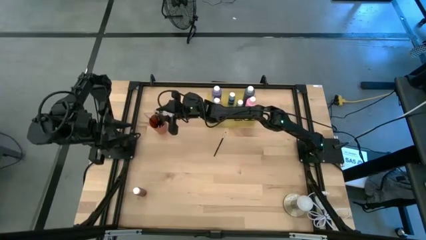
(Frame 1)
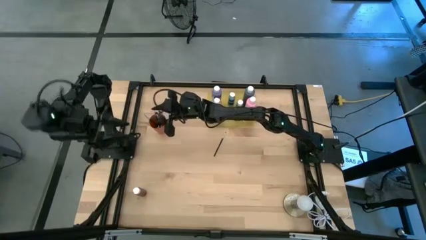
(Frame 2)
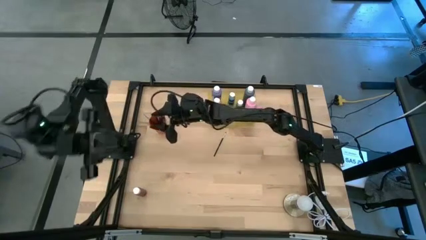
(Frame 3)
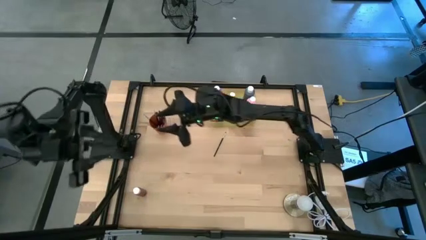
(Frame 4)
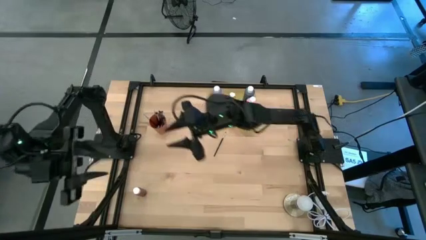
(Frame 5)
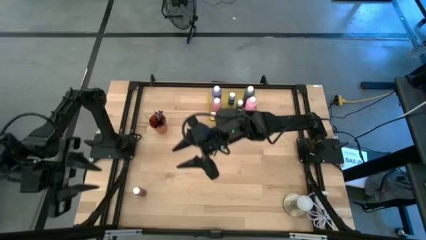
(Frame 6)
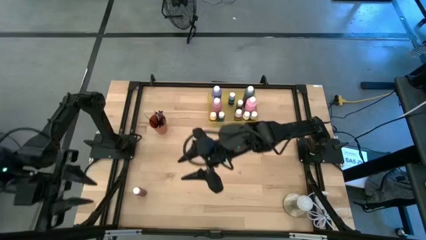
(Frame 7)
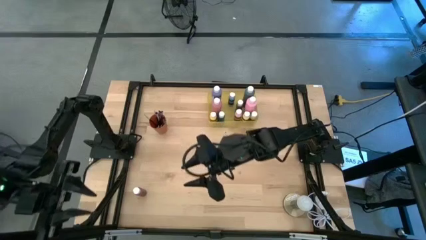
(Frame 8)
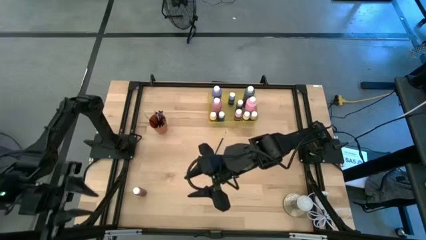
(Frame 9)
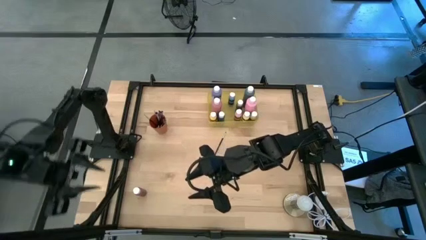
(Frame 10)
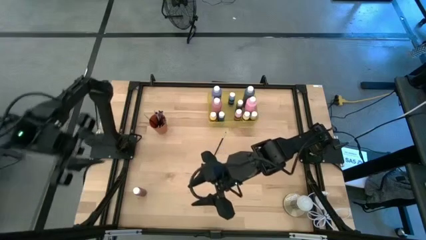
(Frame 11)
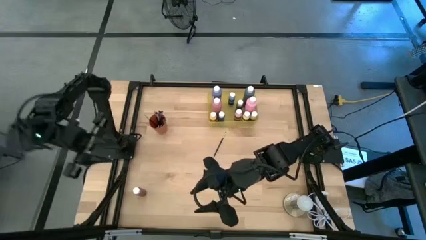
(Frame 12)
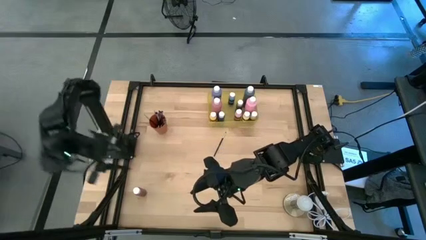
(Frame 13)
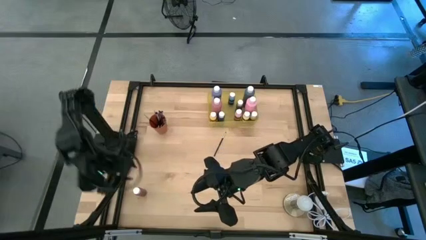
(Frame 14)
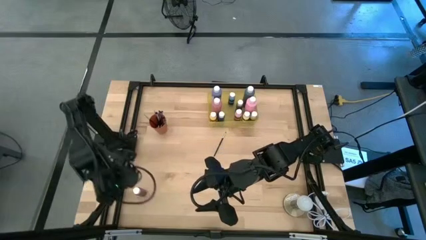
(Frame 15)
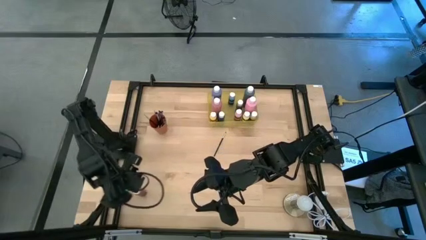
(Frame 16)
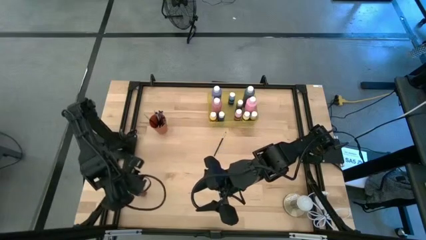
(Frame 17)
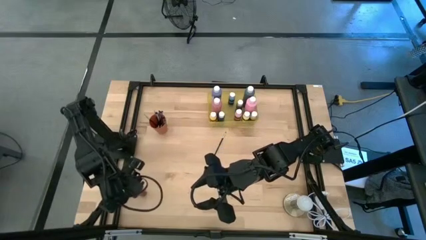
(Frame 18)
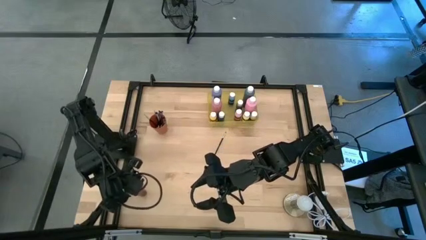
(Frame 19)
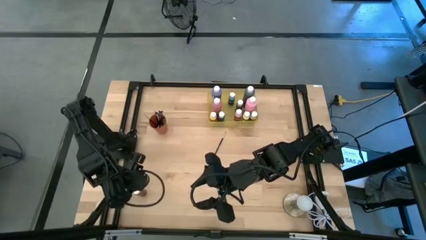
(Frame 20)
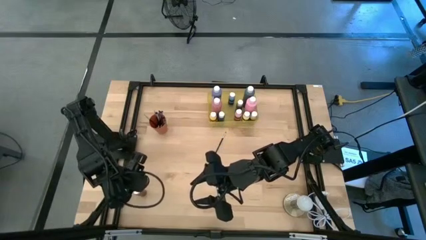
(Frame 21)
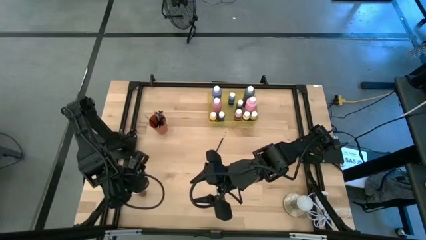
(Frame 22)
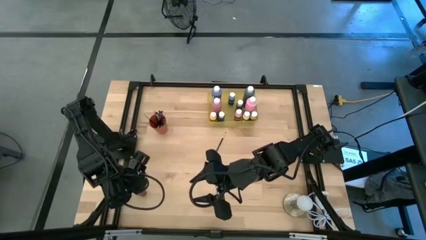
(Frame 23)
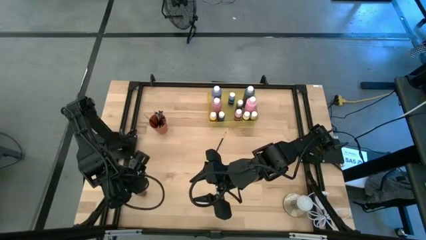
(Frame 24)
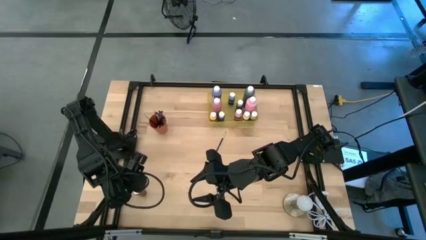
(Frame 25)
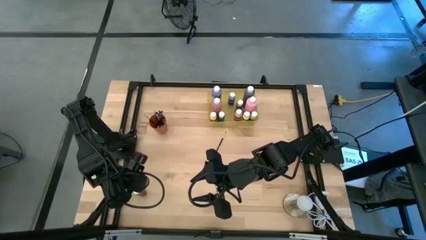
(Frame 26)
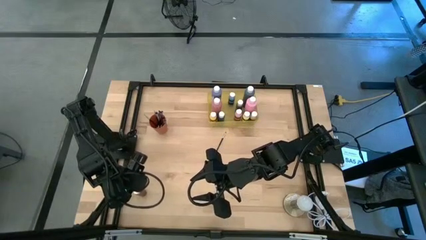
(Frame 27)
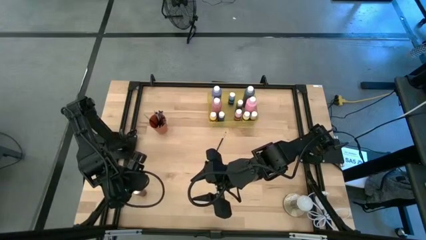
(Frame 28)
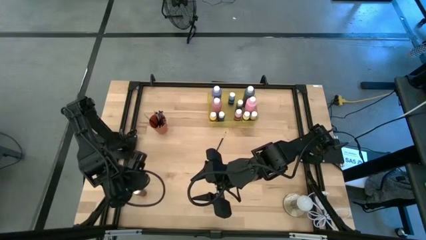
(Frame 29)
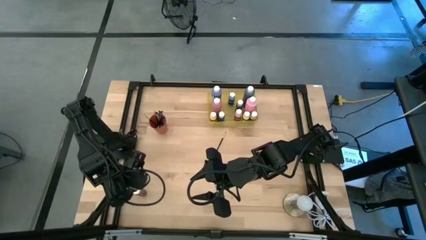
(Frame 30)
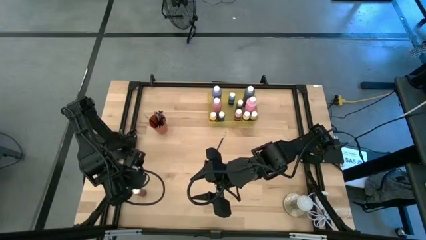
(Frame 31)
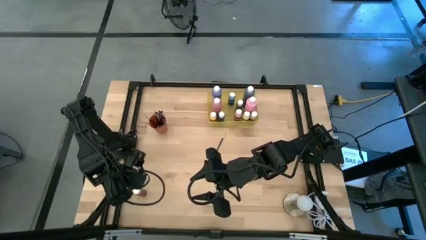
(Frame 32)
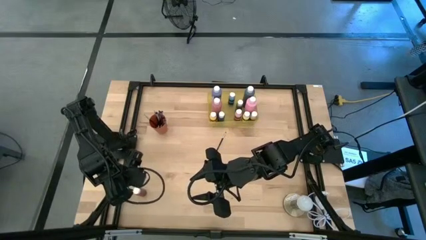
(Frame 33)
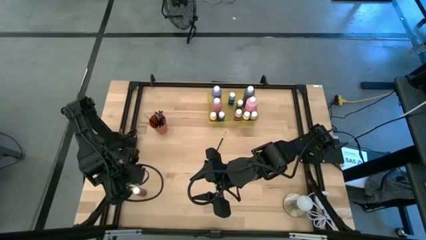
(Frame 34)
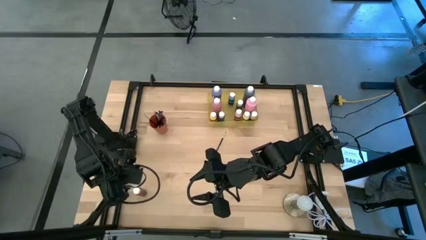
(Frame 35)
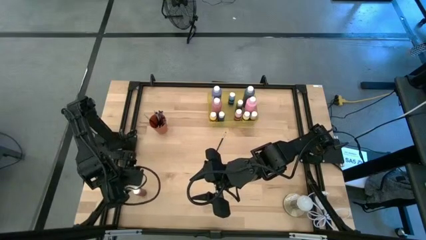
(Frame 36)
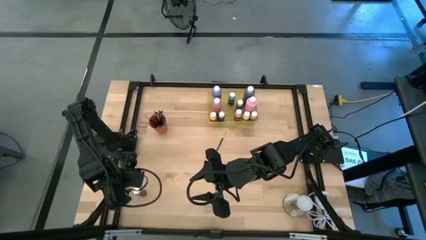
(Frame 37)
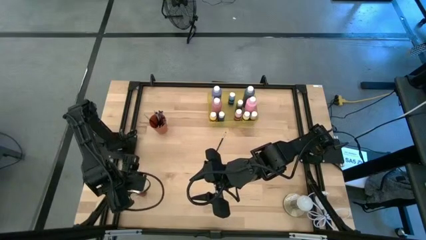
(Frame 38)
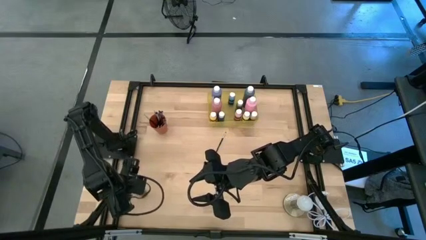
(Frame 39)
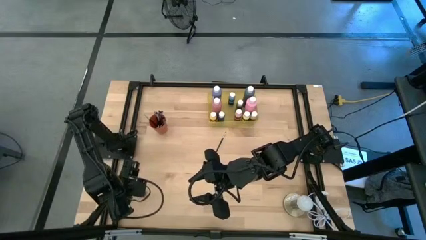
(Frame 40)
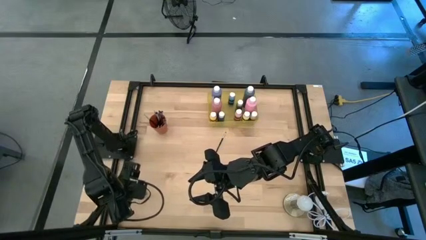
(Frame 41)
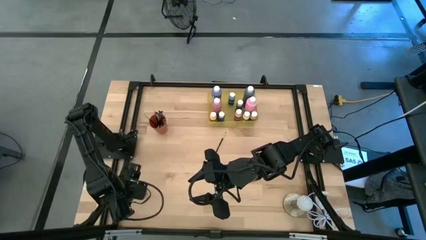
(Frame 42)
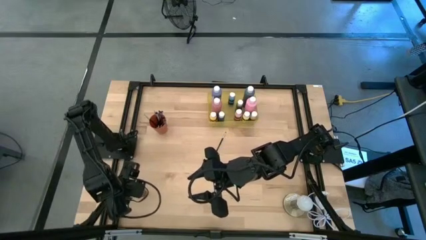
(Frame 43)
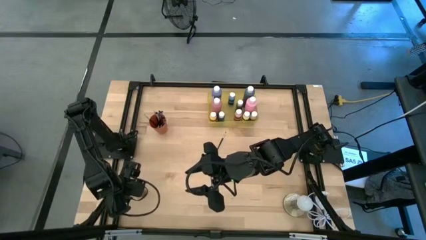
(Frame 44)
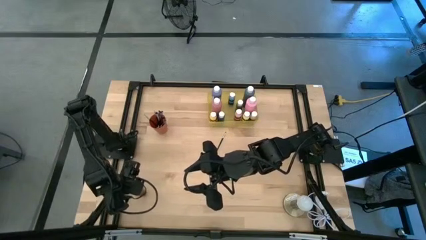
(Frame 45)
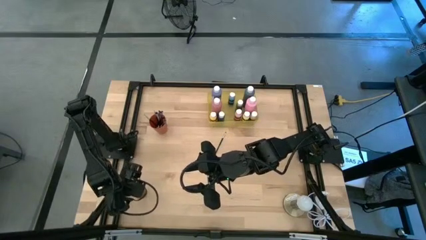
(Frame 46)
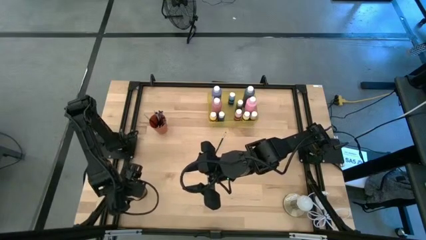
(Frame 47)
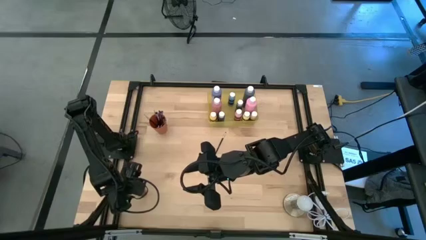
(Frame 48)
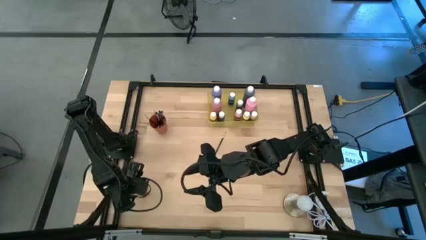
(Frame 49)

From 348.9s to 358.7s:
Task: Pick & Place Paint Supplies
Put the small red paint bottle into the yellow bin

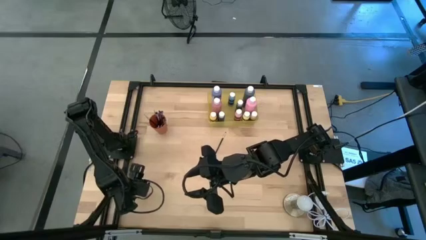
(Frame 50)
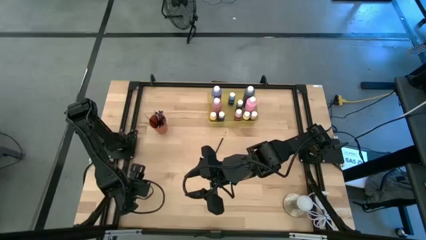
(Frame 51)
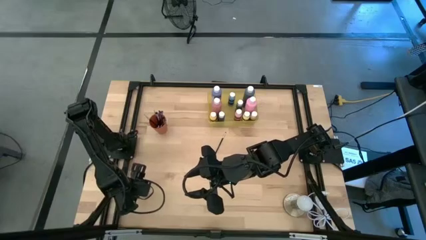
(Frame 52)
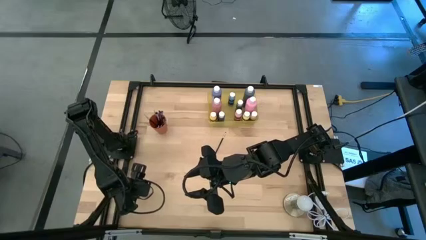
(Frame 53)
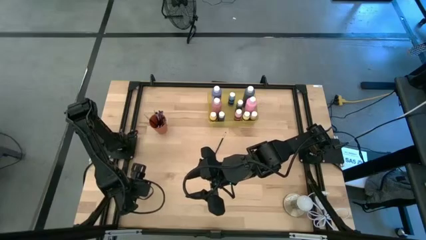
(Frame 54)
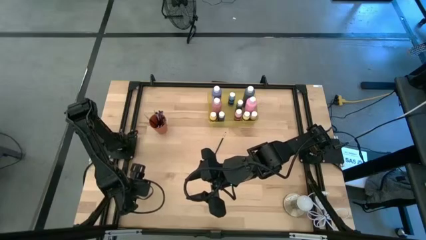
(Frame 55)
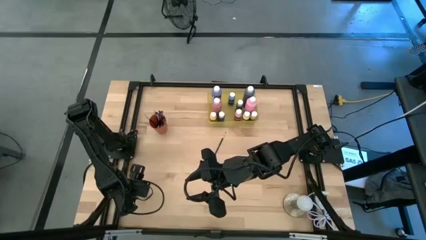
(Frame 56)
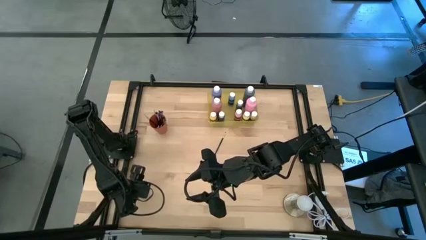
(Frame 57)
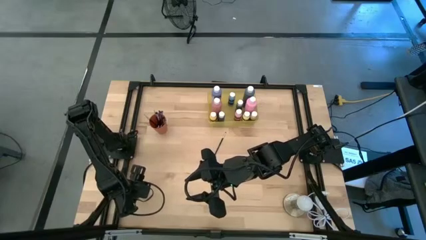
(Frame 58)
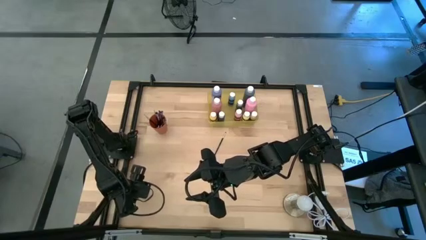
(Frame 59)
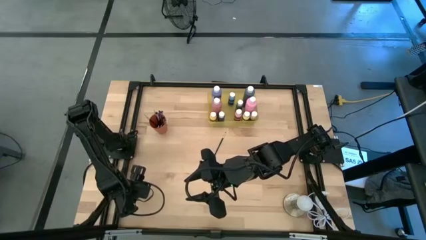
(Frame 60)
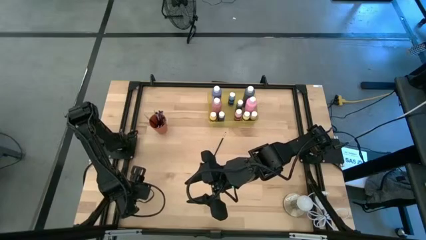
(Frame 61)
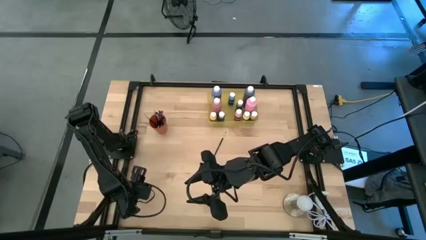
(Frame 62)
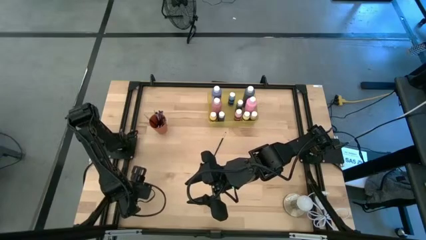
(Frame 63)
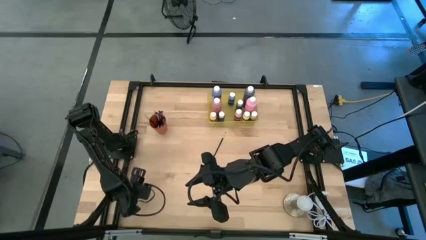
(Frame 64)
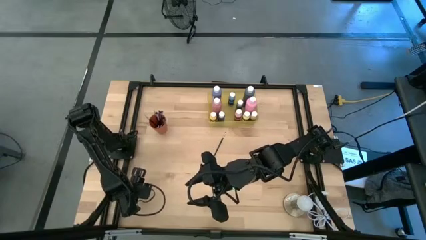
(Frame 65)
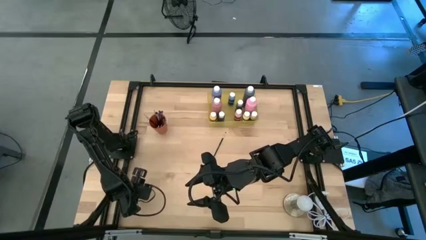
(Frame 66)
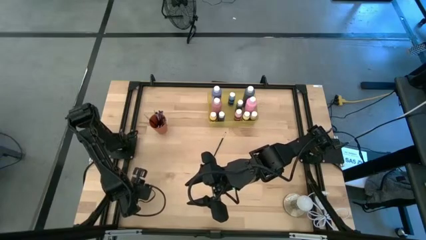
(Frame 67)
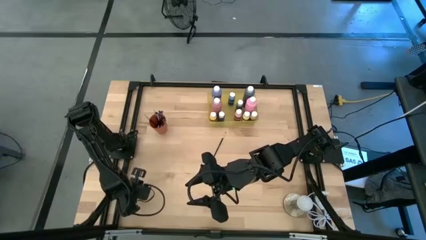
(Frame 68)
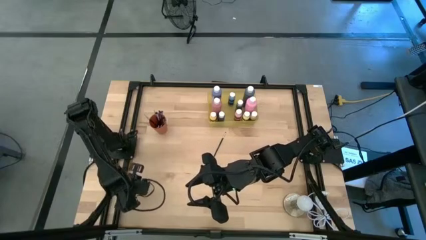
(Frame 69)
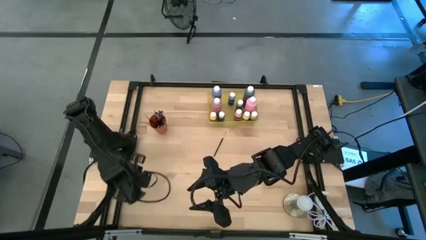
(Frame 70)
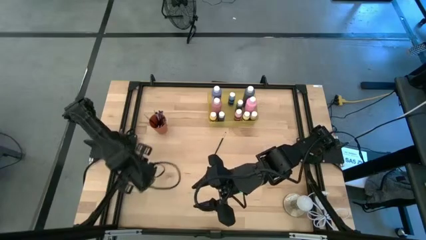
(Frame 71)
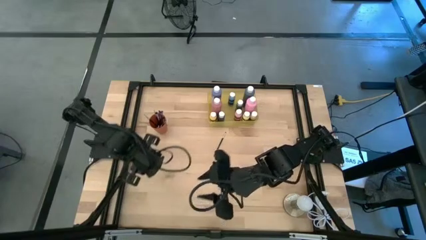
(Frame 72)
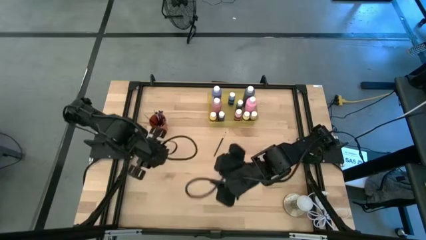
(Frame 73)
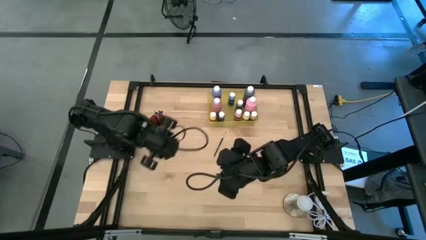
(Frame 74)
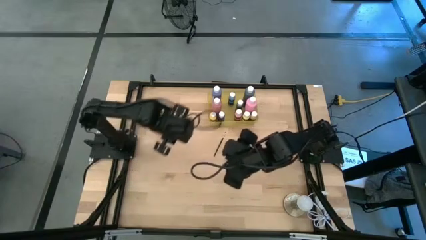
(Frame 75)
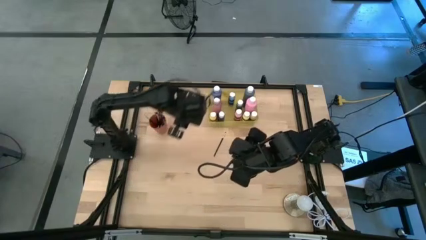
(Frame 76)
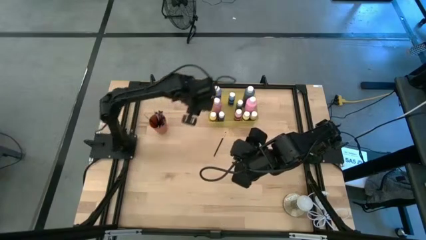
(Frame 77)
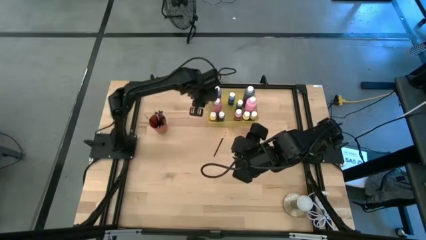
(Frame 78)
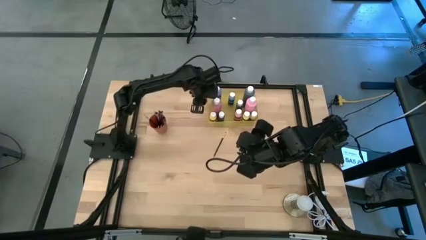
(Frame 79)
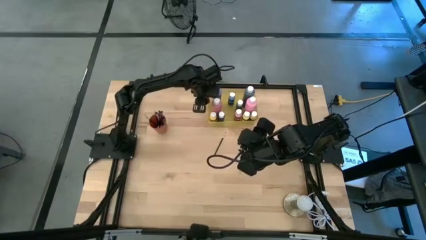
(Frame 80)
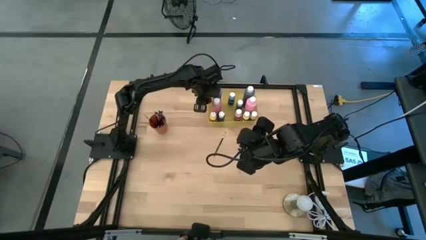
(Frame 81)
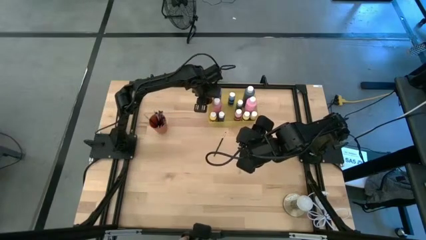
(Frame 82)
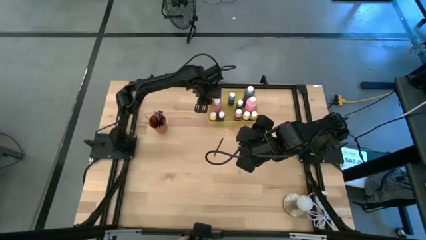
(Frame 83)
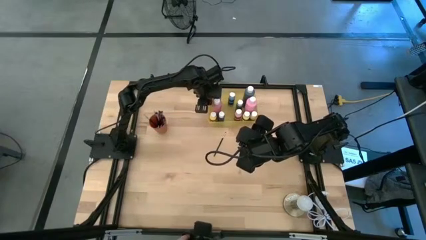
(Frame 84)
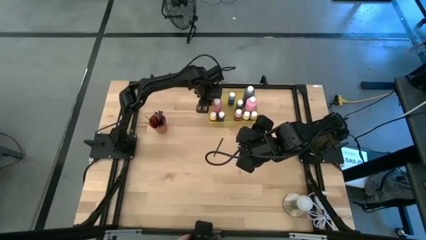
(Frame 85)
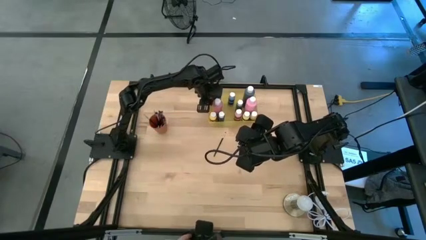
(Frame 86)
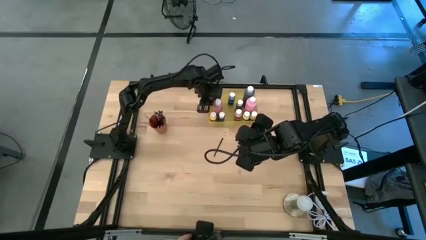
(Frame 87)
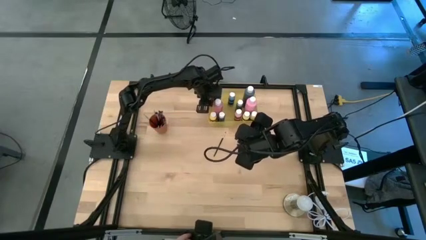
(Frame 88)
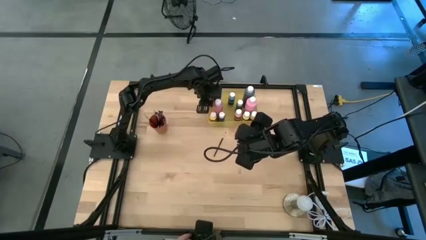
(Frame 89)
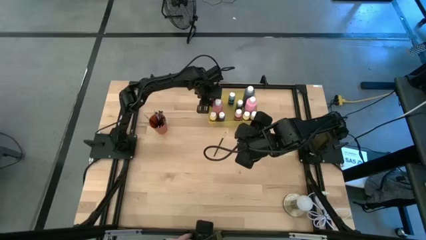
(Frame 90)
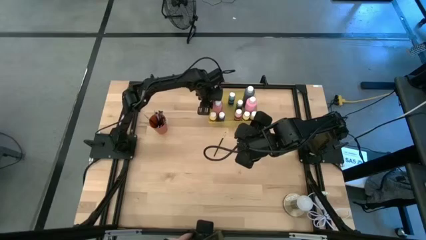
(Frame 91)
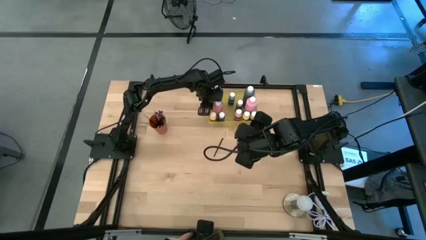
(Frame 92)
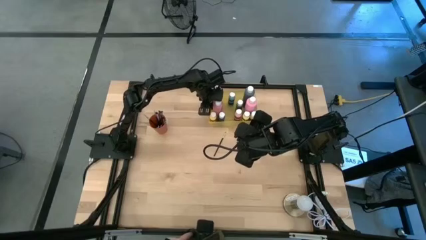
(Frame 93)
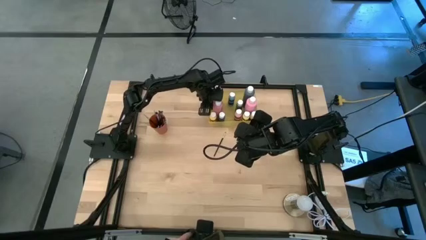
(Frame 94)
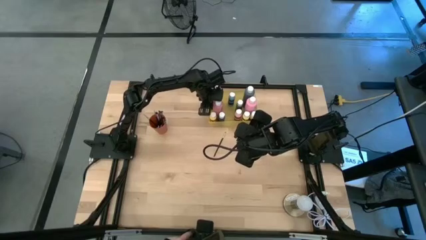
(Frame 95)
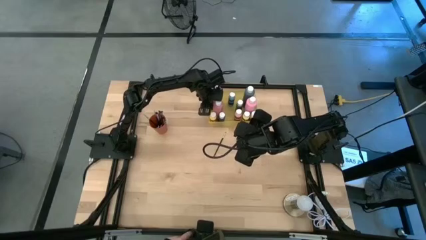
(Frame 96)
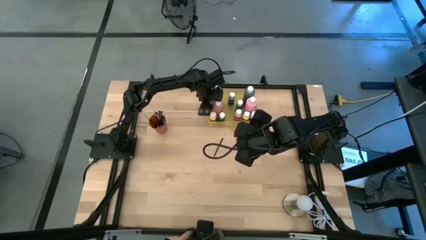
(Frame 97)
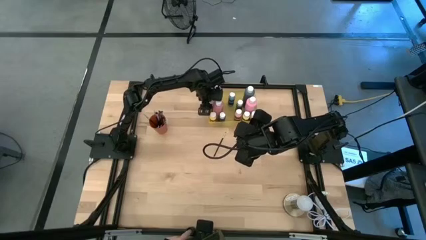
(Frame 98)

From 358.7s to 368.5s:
Put the small red paint bottle into the yellow bin
